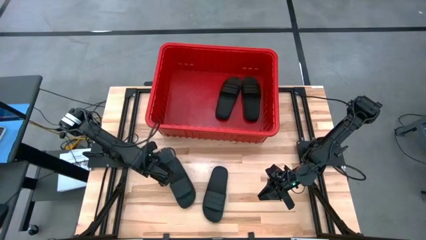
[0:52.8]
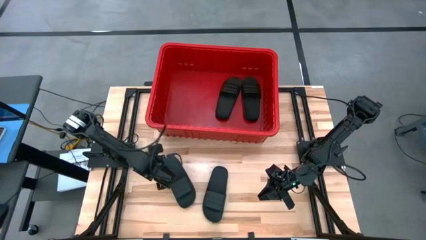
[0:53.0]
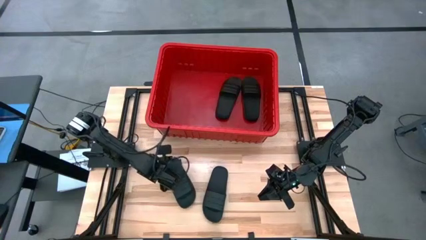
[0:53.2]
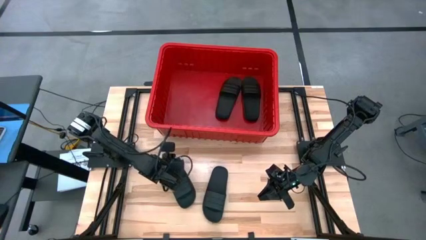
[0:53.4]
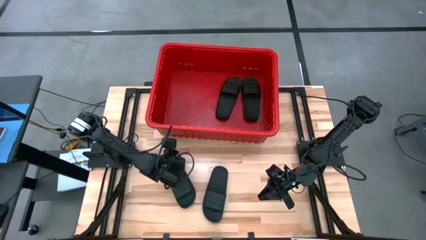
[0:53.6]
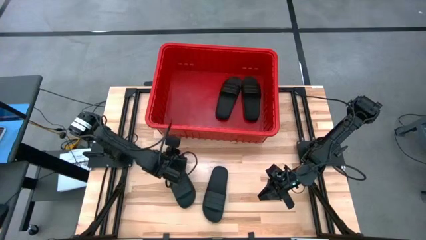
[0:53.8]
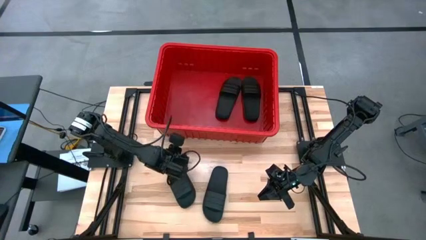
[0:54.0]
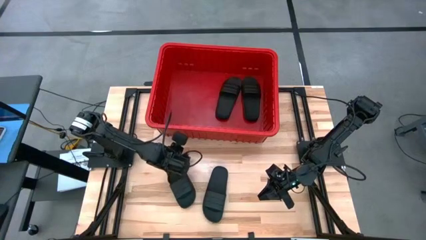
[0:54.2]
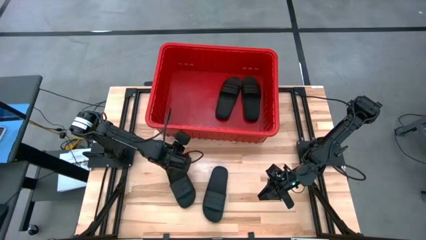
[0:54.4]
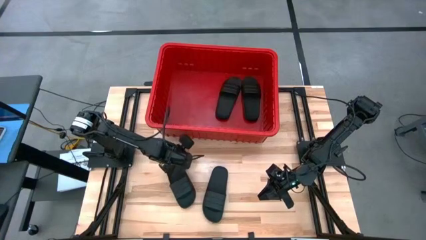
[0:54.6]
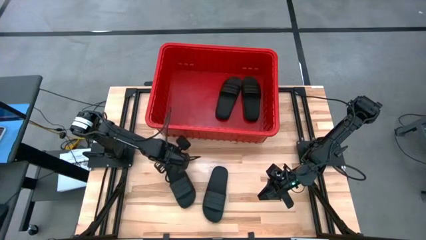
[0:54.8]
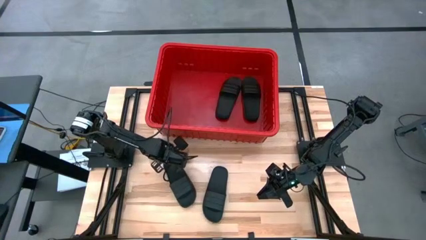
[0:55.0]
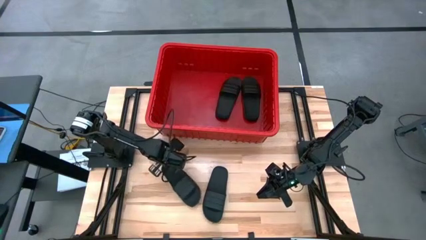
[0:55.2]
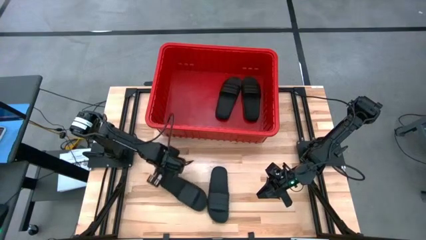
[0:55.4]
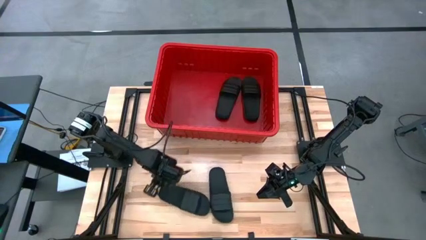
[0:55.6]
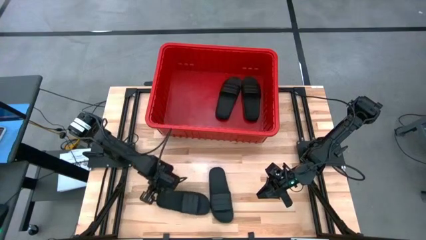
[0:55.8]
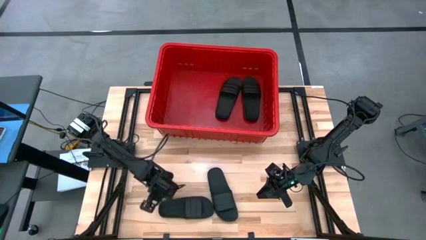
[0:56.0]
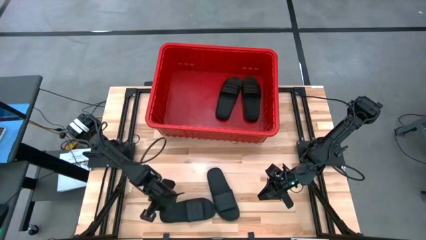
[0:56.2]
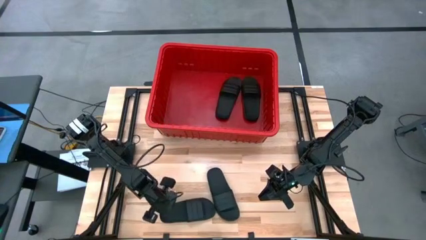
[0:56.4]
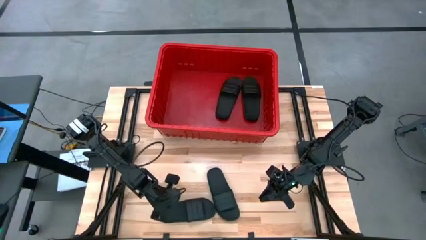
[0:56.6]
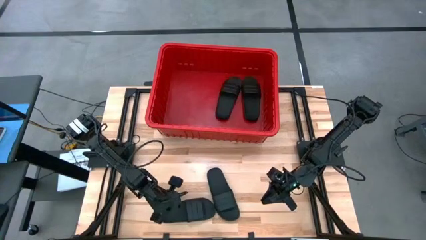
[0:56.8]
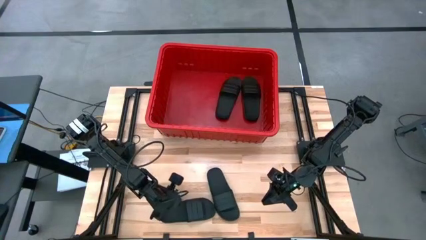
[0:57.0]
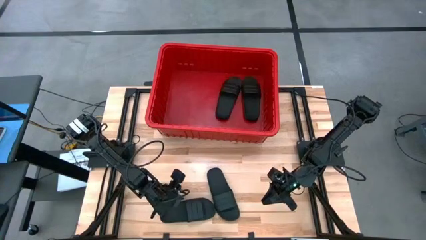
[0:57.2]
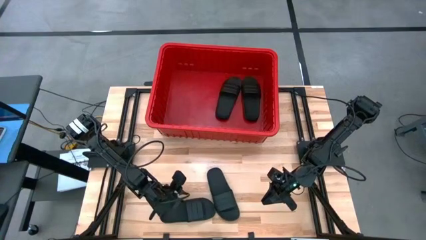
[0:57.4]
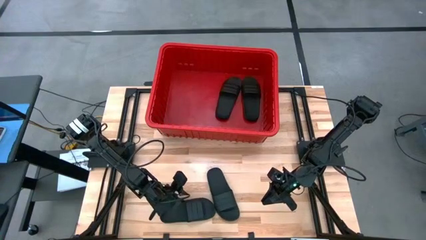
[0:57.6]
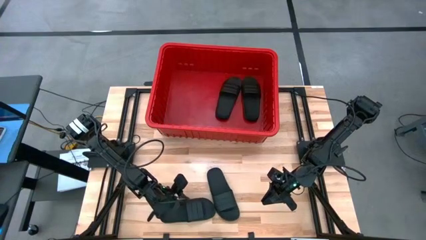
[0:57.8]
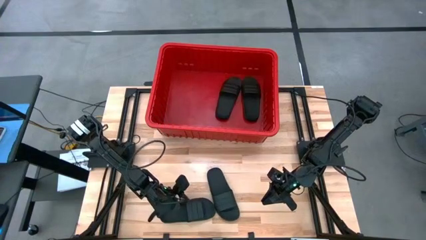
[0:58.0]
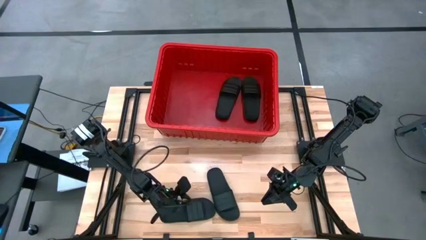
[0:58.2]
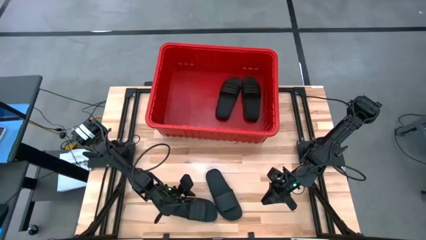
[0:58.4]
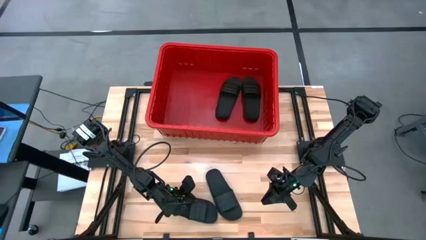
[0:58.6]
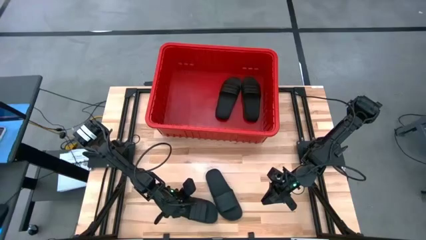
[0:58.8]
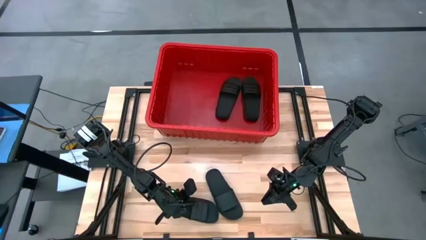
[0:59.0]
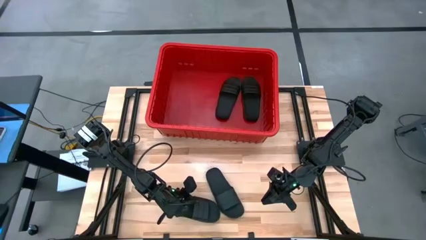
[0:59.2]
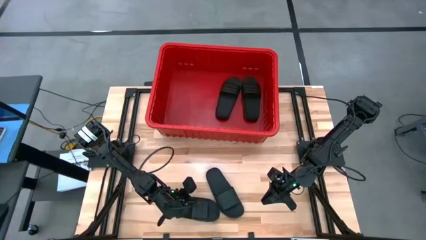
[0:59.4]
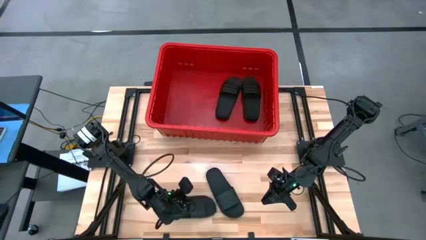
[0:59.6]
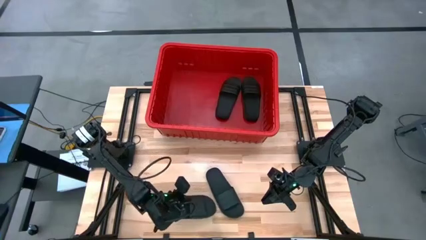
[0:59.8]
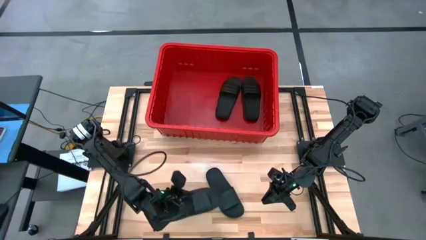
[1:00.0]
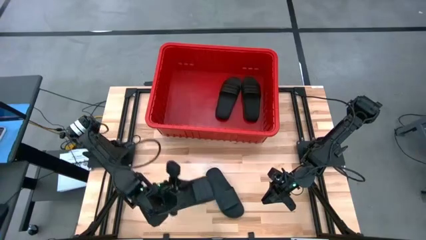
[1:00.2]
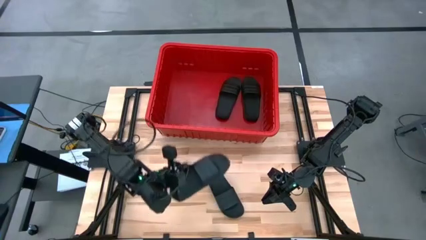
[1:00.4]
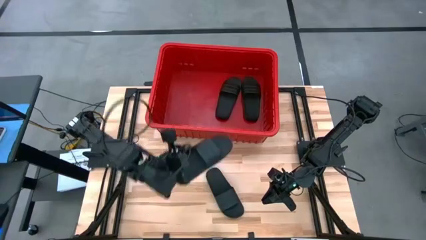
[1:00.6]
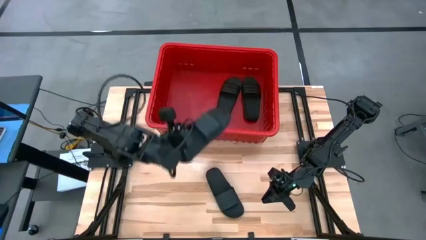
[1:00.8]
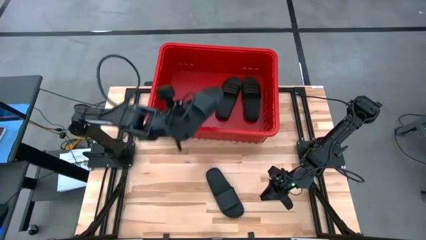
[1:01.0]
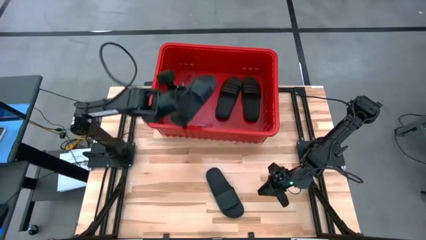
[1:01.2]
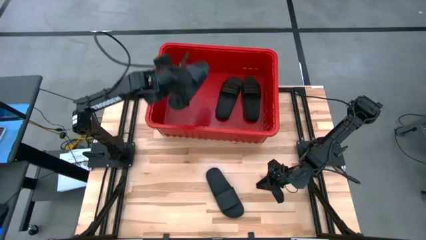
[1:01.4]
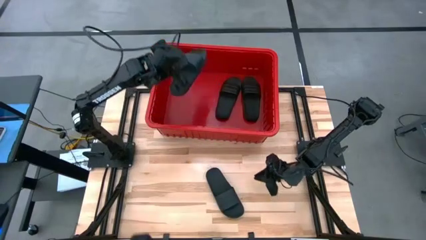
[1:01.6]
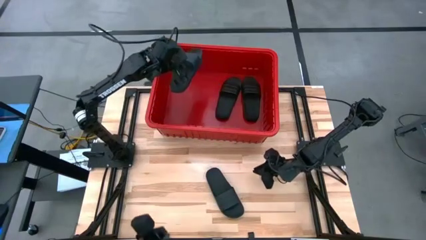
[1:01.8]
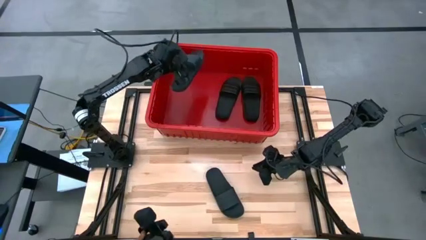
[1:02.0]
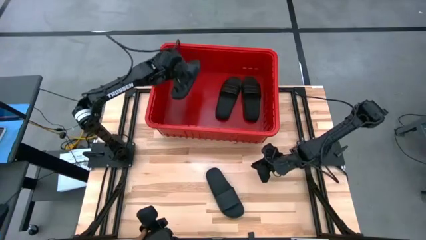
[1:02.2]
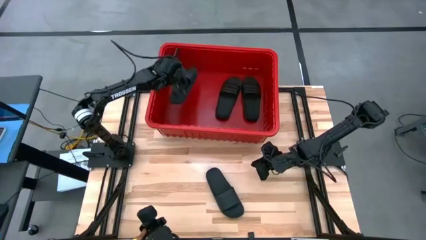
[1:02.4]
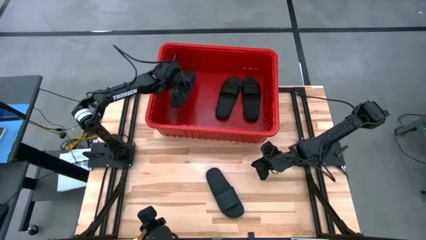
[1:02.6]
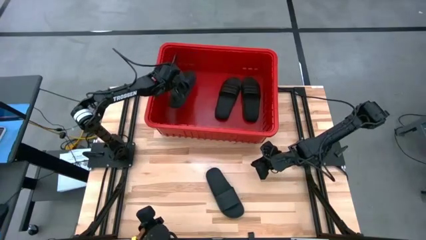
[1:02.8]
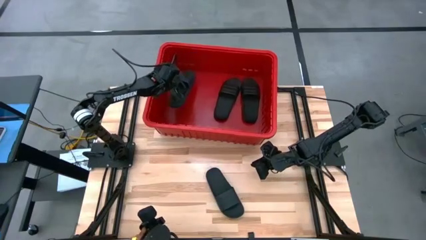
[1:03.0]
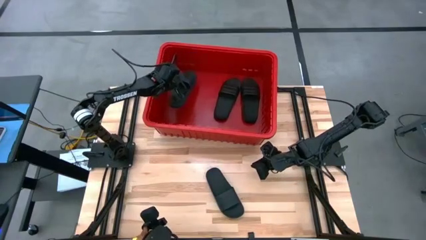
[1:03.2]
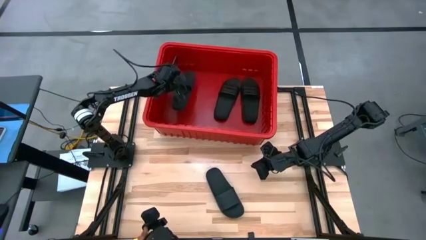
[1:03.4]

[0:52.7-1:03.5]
Task: Pick and place slides into bin
Put the black slide into the red bin

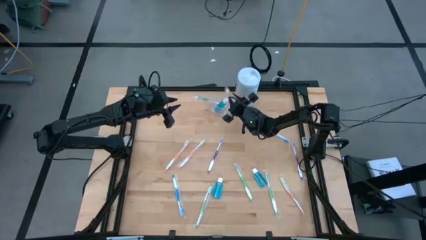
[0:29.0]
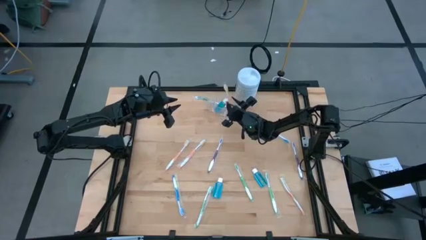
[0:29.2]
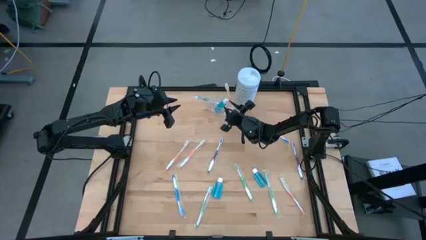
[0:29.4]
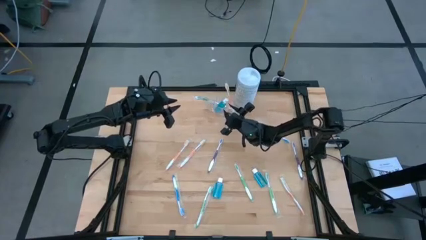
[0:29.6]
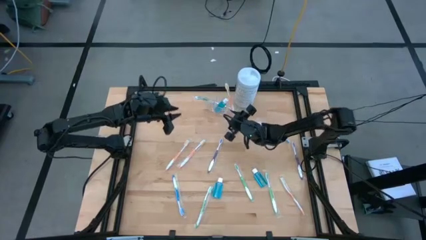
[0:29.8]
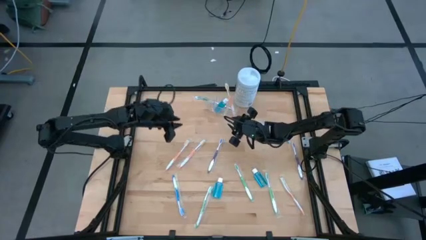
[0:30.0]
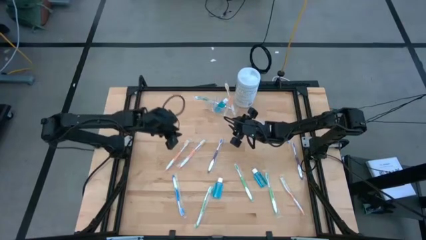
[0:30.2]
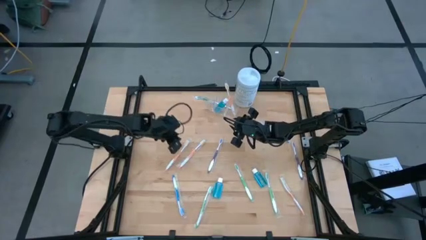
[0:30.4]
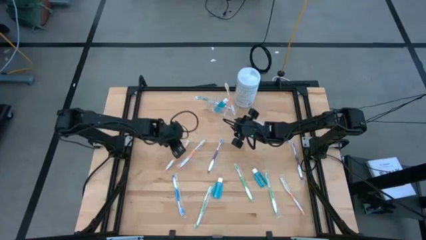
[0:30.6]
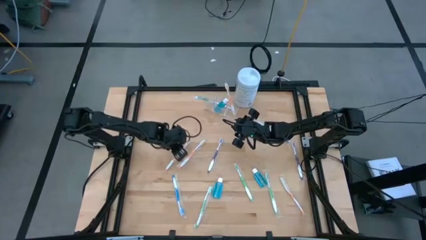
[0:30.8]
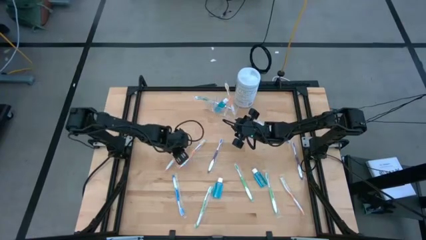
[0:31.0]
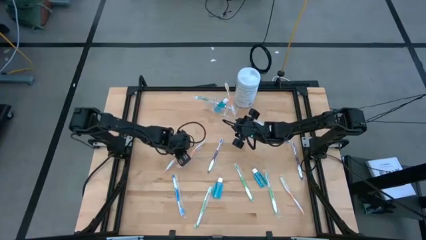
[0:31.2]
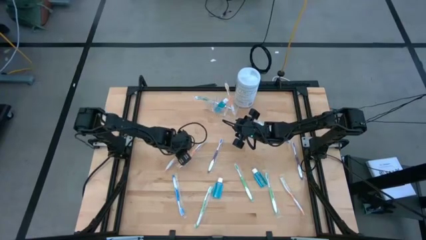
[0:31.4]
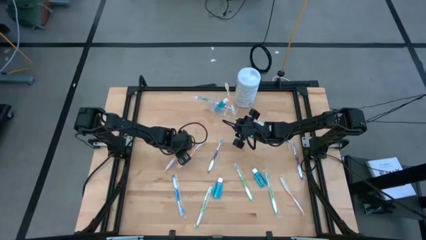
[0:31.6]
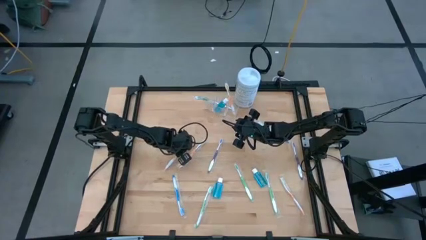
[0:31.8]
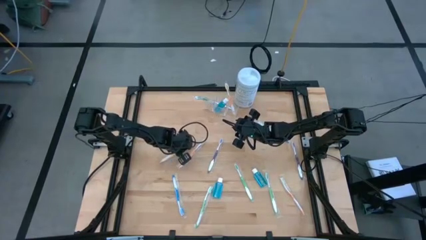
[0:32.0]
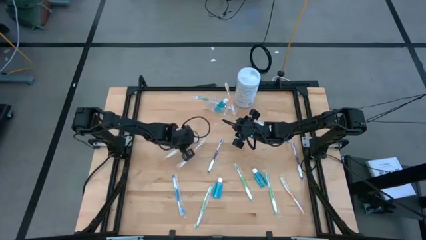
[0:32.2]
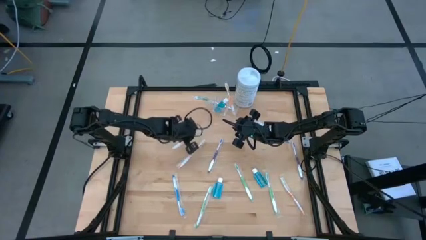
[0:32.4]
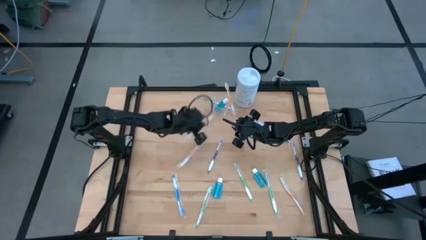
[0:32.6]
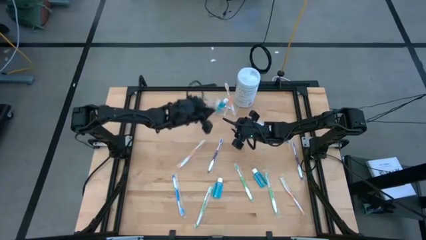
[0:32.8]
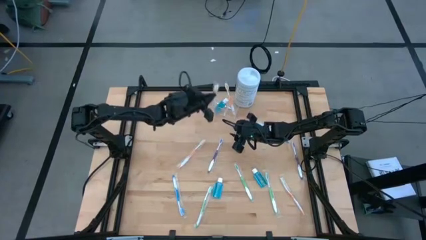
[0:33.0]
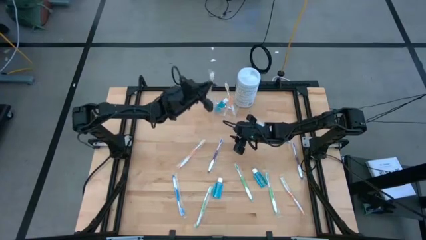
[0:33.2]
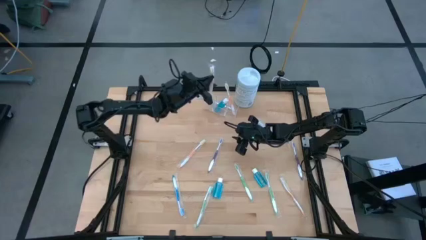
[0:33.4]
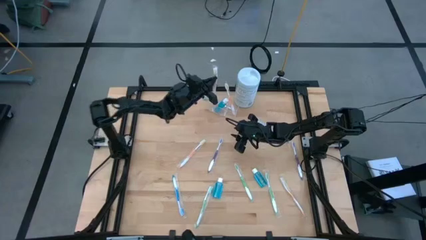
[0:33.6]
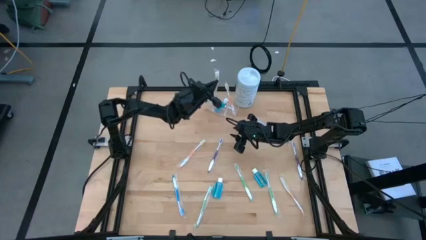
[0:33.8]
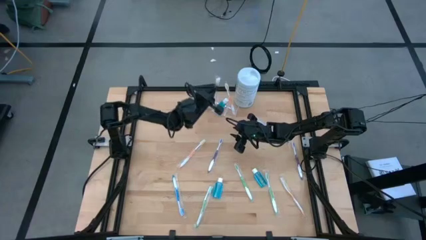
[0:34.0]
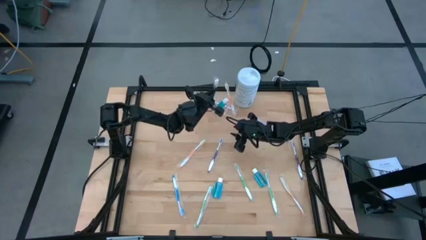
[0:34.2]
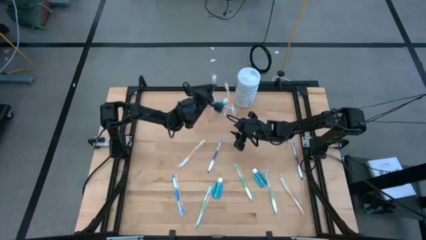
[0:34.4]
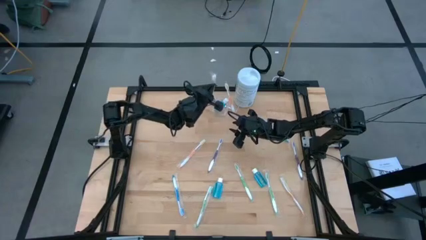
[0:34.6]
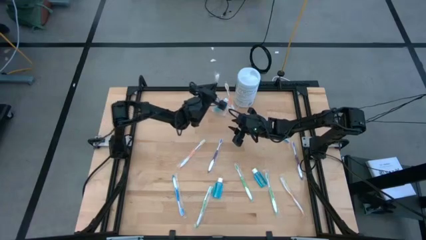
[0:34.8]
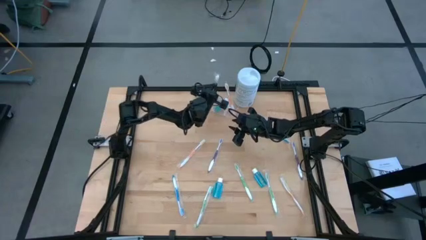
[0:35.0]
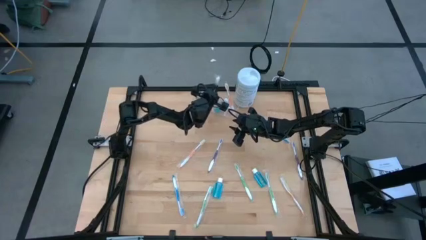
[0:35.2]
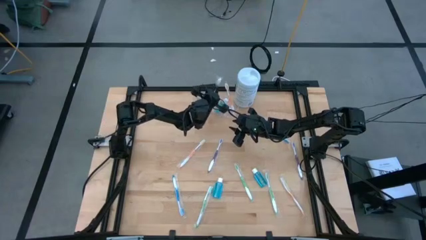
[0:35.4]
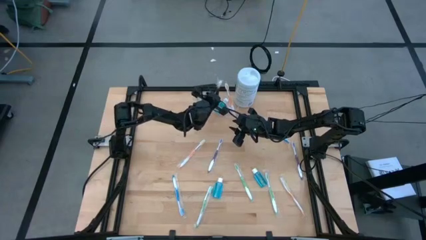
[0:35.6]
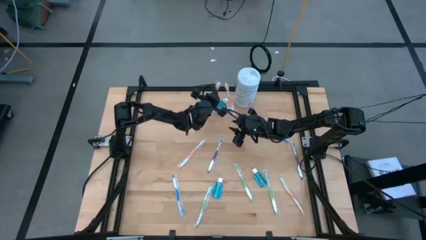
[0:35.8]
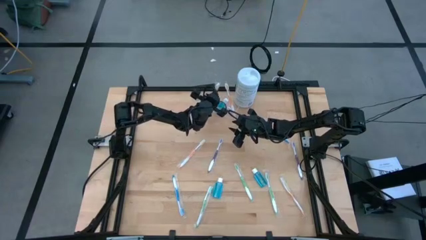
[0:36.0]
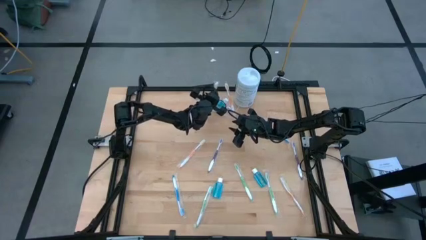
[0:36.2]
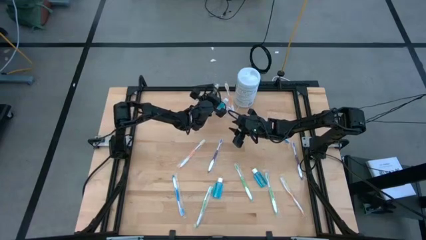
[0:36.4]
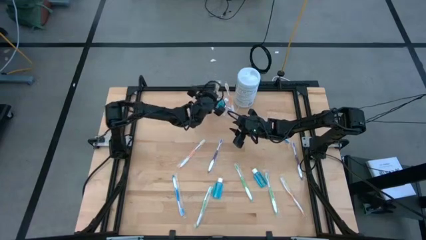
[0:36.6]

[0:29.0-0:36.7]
Task: Pick & Place toothbrushing station
Put the orange toothbrush into the transparent organizer
